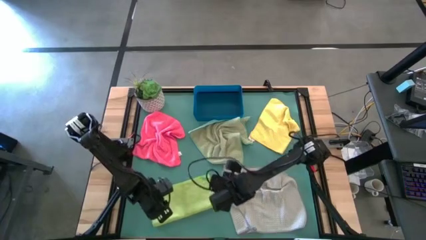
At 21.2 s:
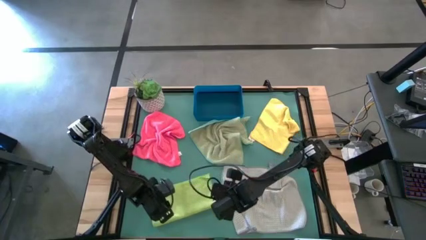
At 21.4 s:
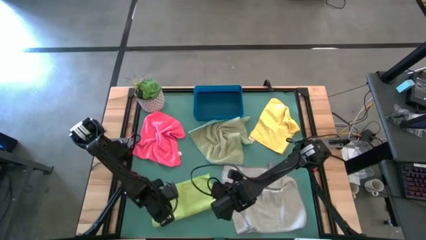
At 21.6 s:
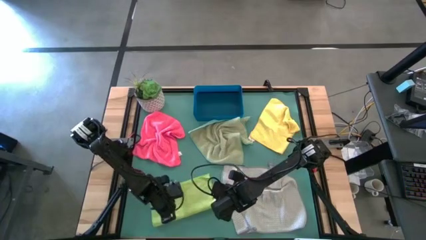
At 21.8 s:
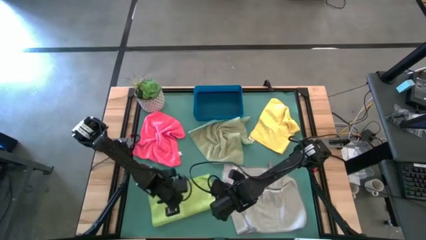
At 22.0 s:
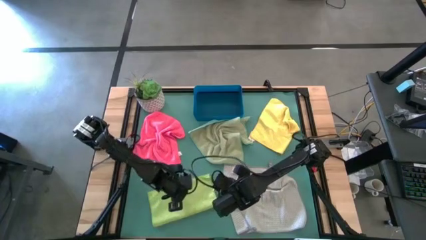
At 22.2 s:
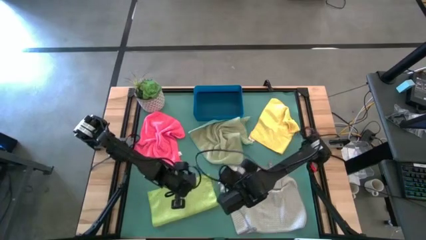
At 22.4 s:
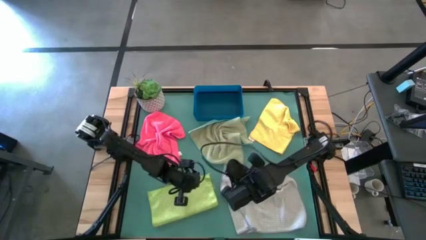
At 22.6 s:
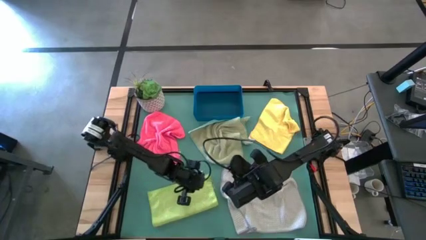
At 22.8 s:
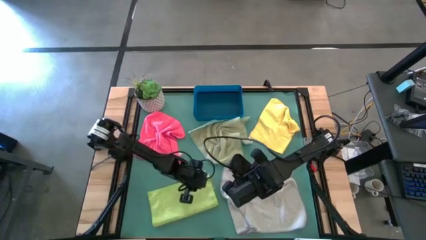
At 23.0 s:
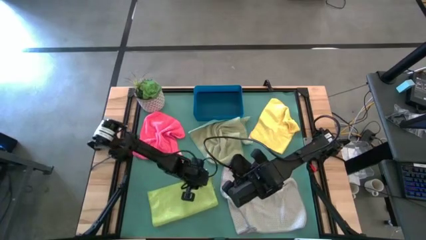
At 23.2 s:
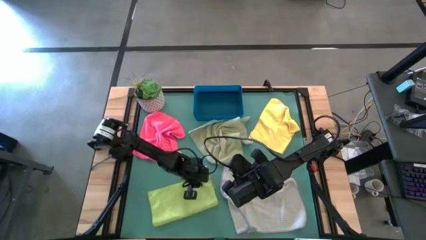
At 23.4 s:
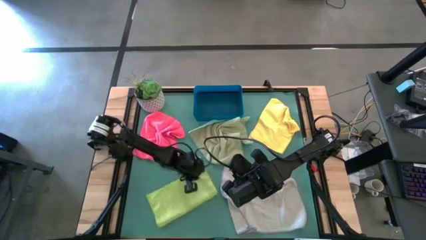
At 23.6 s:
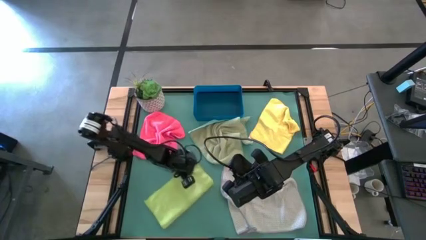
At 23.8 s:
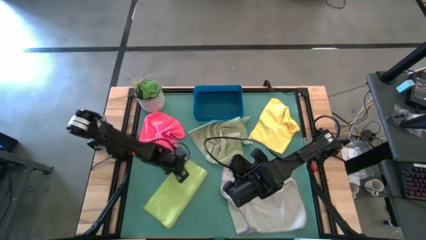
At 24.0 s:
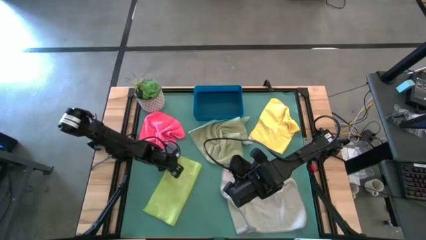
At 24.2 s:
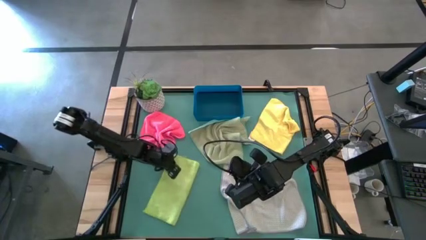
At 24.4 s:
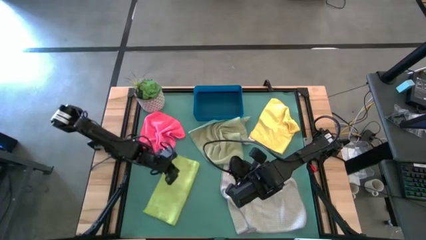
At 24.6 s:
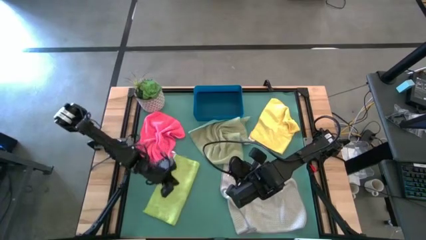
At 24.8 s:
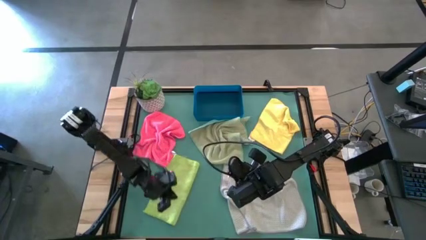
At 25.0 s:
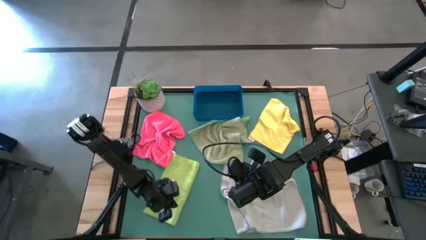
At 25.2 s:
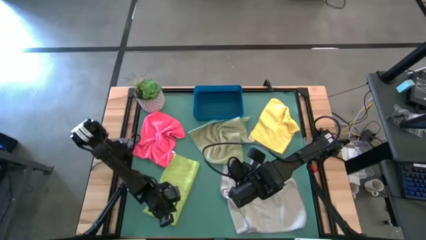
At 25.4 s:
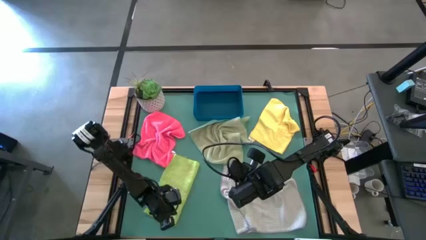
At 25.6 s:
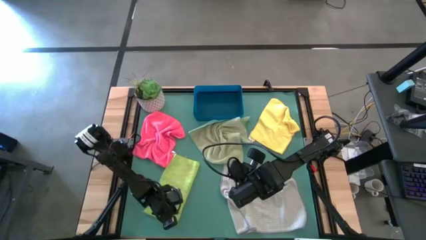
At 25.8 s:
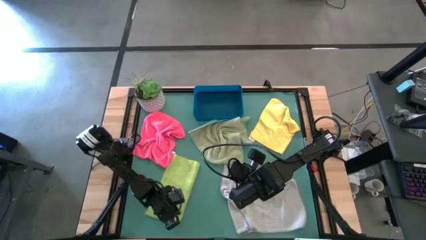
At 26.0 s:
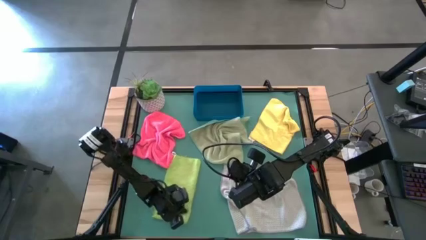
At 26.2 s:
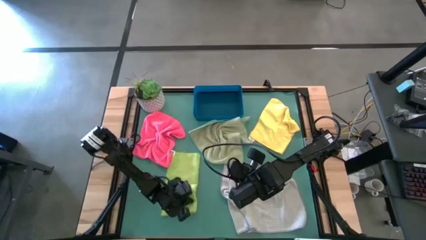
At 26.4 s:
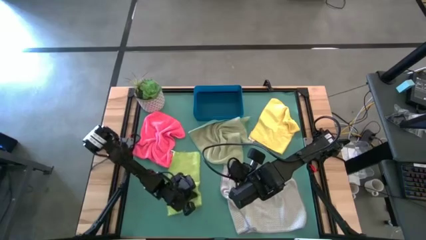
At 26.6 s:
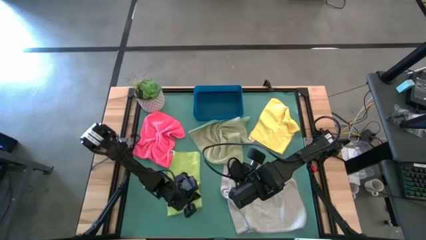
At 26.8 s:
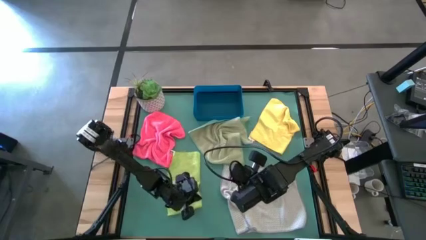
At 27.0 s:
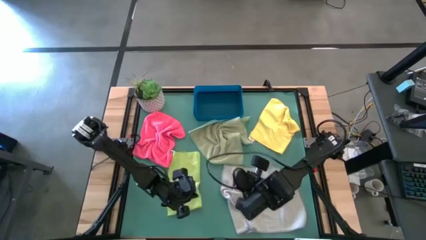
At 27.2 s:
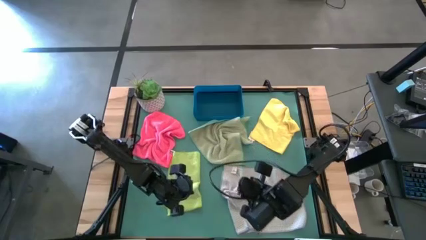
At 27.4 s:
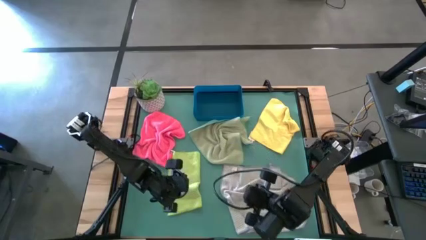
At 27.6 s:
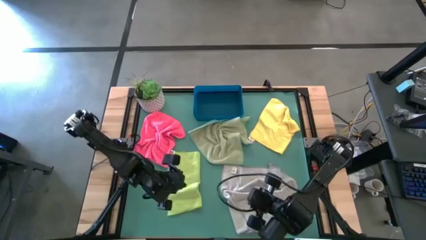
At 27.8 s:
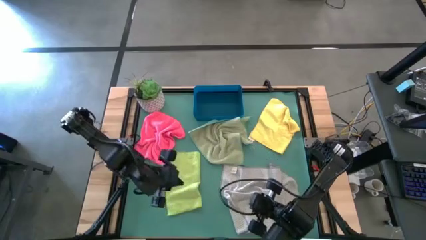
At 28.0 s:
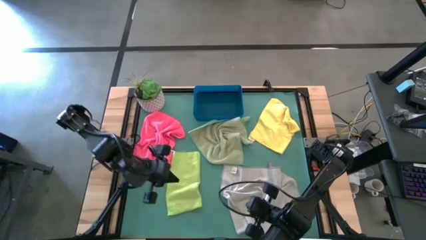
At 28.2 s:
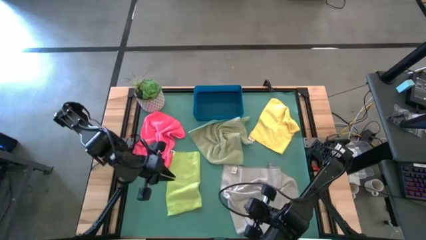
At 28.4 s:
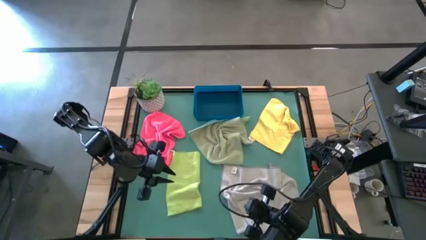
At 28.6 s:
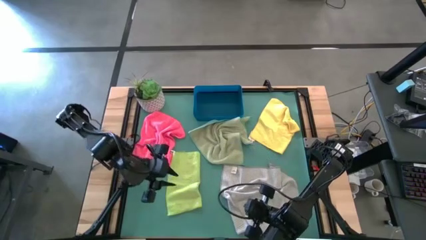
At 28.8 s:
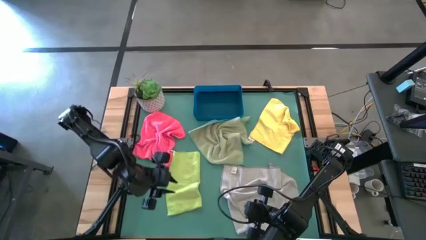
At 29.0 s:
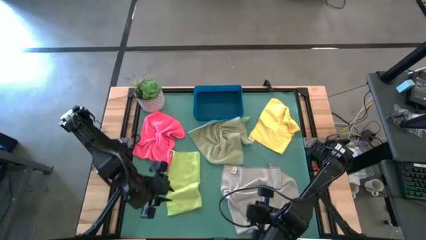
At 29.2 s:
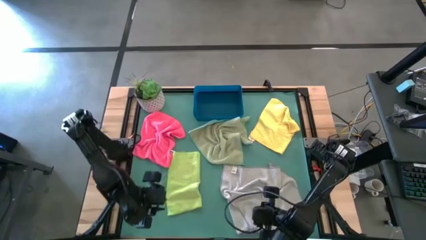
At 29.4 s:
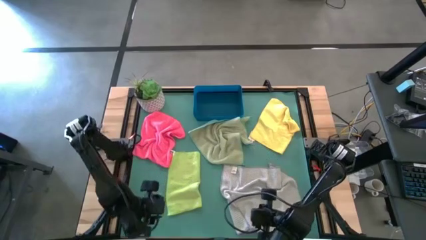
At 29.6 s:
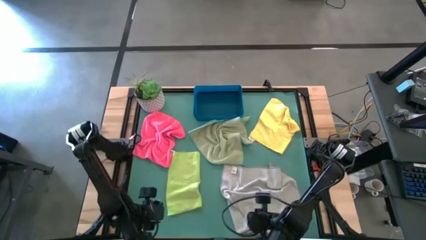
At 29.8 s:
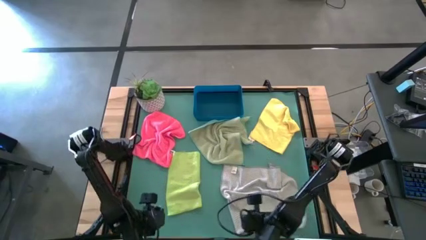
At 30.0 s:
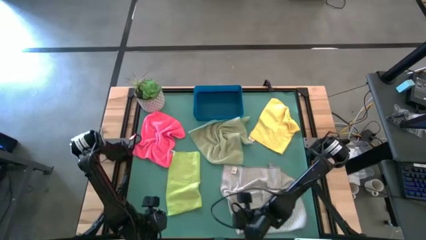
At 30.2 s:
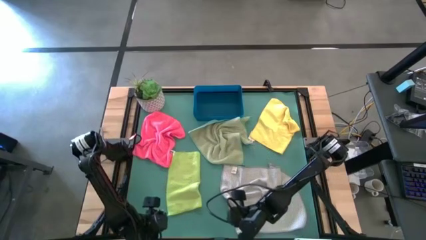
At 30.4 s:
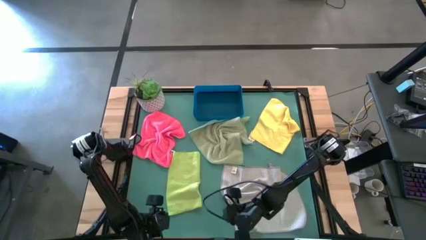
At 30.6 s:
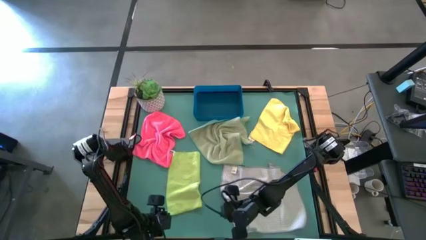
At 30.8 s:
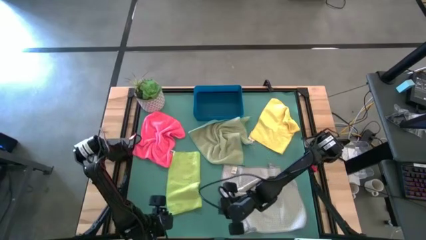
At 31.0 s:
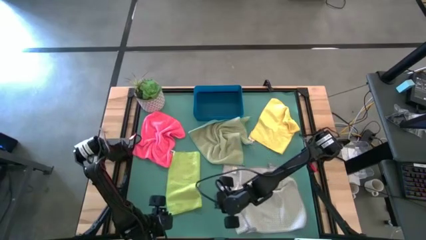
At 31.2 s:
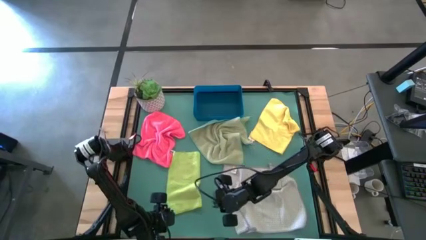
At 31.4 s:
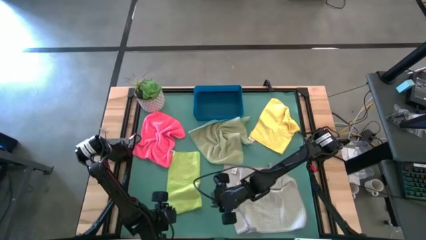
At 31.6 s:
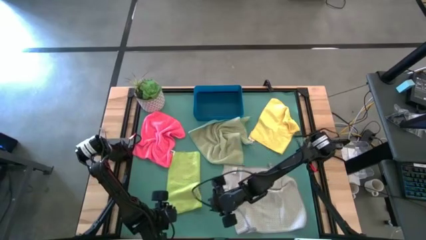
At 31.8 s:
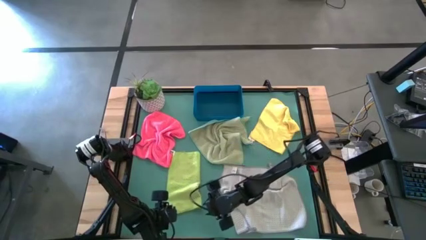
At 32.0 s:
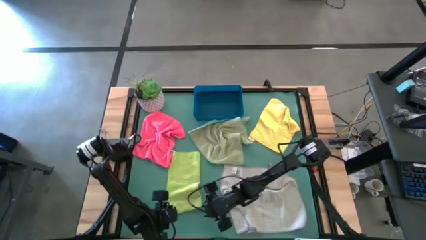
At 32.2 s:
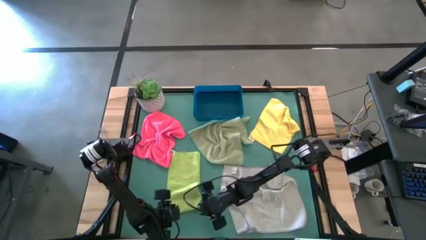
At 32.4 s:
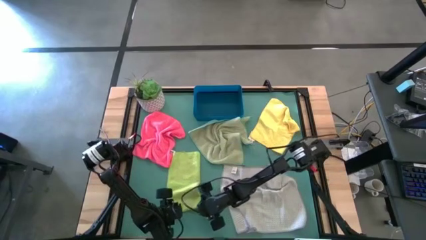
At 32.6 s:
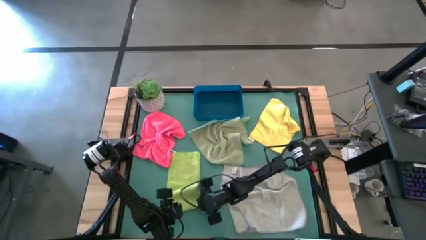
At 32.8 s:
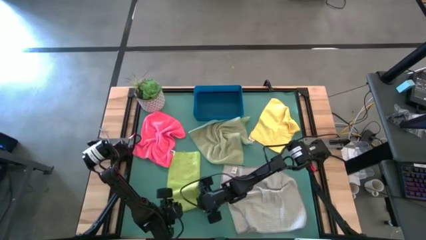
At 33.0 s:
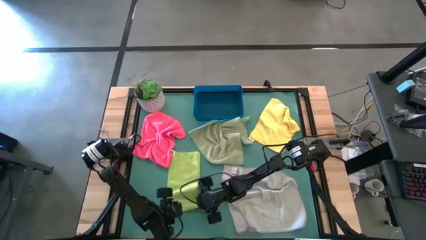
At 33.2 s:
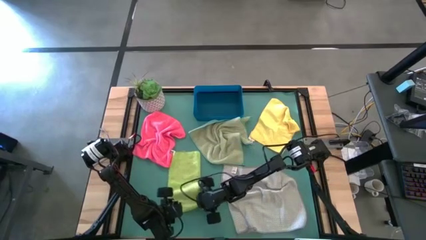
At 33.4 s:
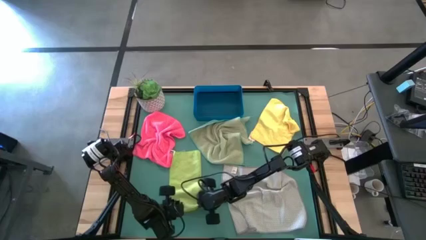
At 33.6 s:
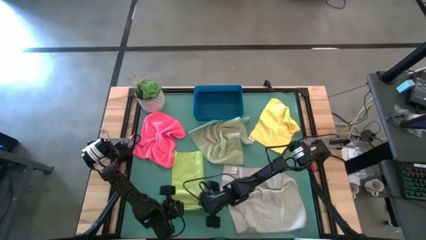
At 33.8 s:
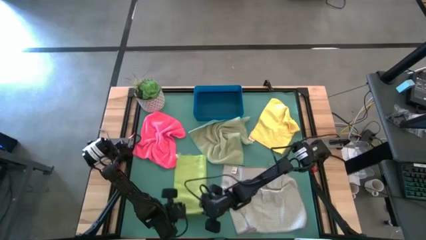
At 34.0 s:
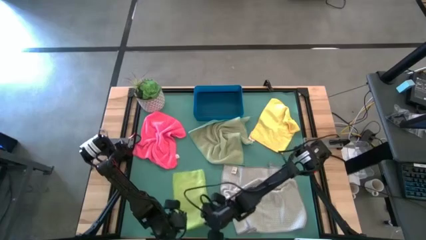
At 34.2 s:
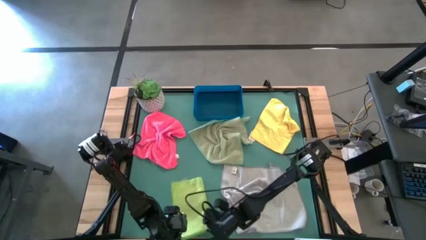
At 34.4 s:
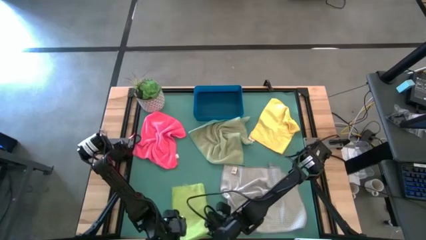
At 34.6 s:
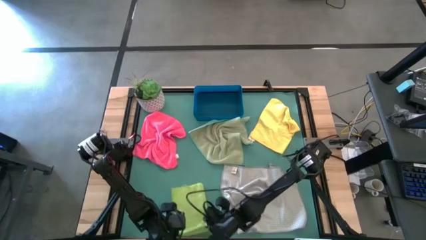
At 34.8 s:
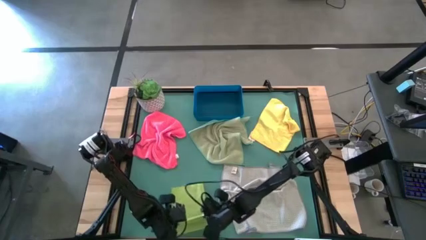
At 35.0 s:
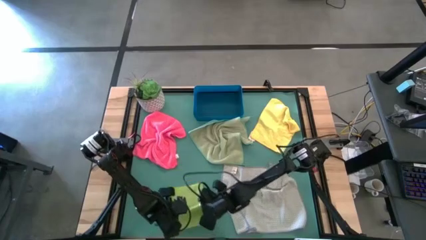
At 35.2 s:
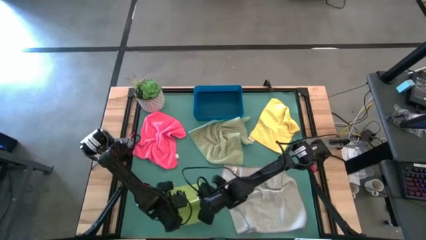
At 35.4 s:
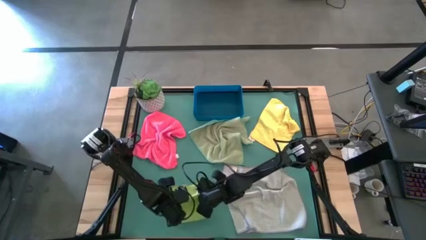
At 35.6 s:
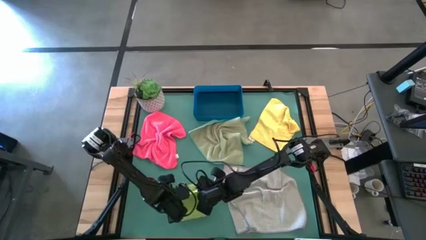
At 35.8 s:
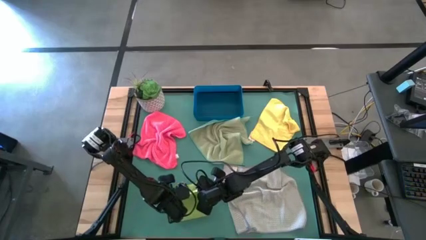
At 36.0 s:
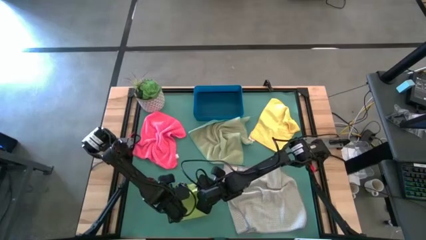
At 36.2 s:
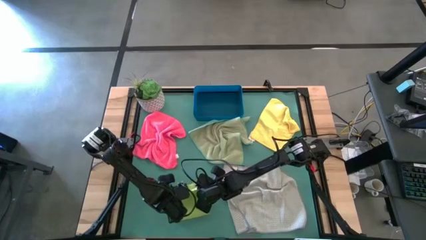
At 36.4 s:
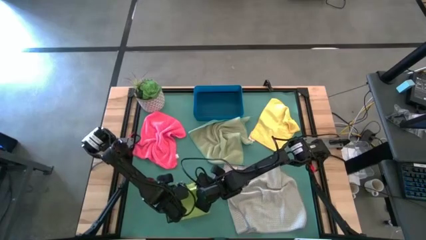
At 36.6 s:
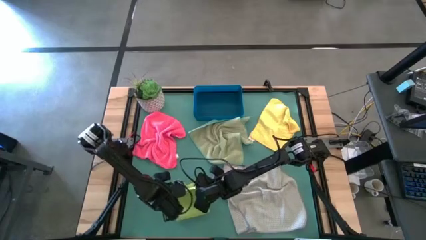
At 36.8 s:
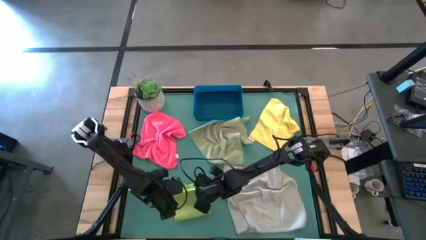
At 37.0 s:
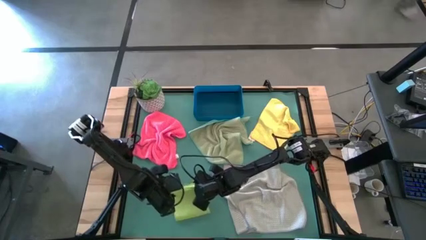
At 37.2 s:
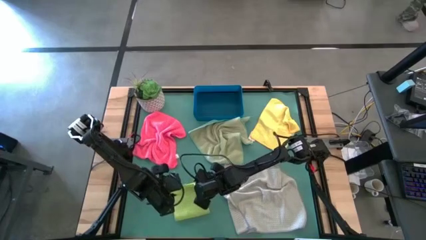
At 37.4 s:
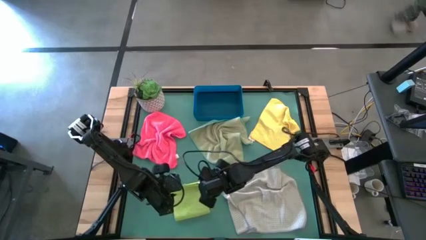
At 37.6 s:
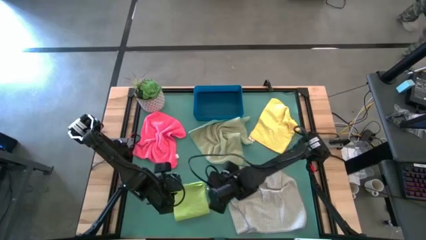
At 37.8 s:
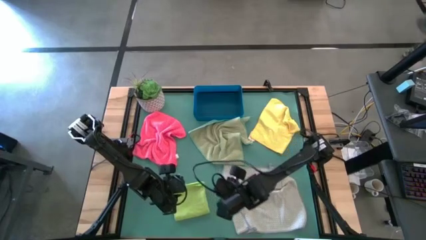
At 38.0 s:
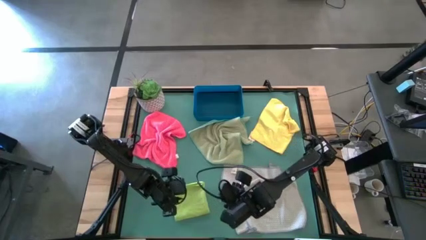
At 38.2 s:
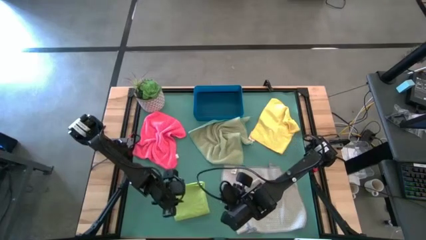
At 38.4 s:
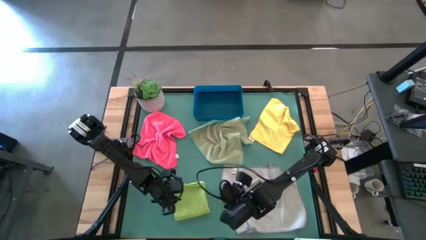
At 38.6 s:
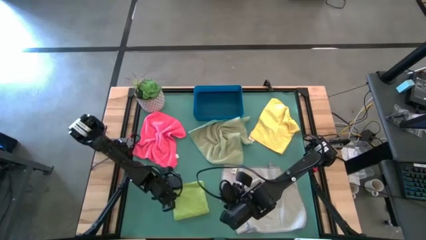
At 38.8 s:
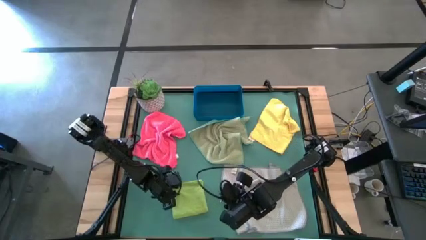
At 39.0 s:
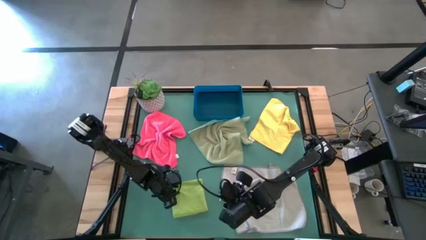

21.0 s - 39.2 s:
Task: Fold microfiber towels
Fold the green microfiber towel
